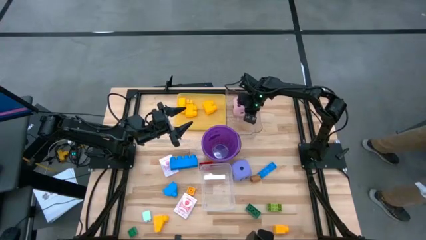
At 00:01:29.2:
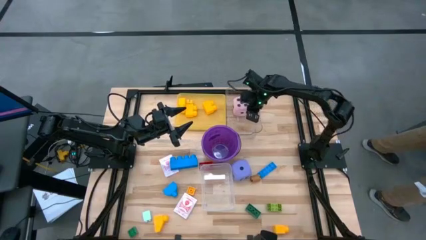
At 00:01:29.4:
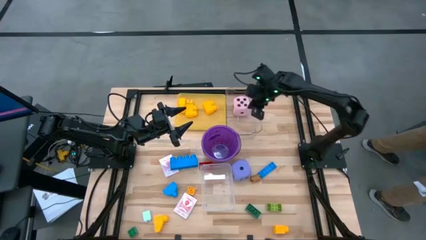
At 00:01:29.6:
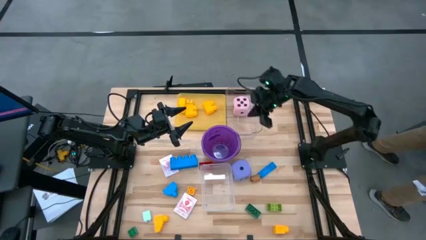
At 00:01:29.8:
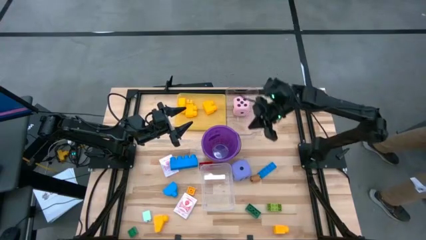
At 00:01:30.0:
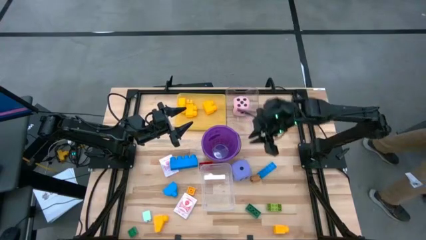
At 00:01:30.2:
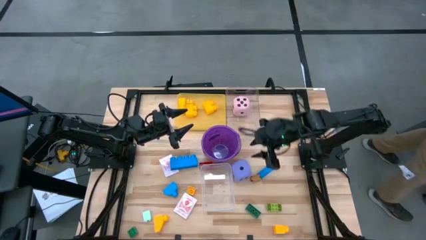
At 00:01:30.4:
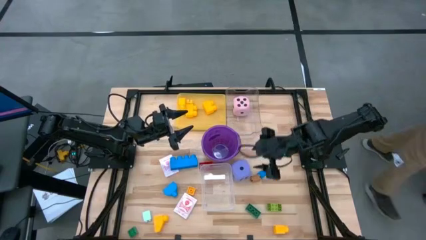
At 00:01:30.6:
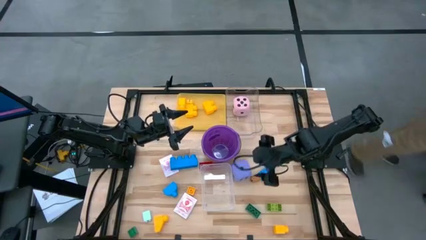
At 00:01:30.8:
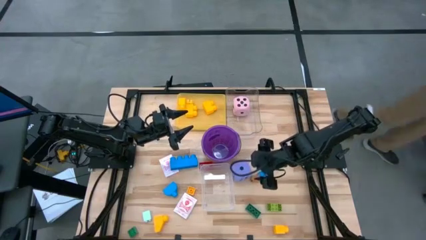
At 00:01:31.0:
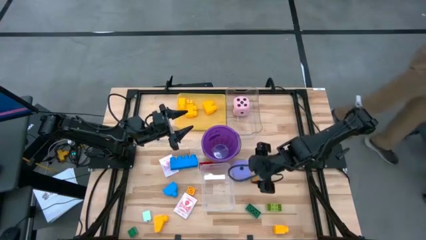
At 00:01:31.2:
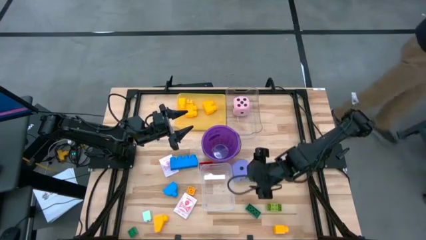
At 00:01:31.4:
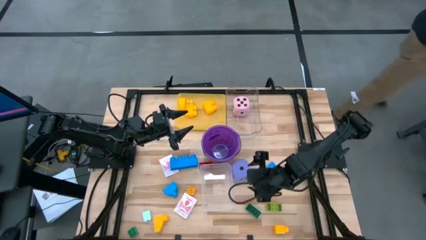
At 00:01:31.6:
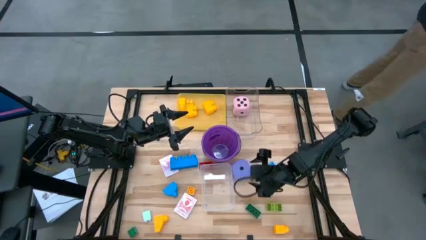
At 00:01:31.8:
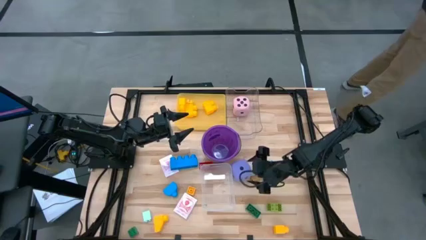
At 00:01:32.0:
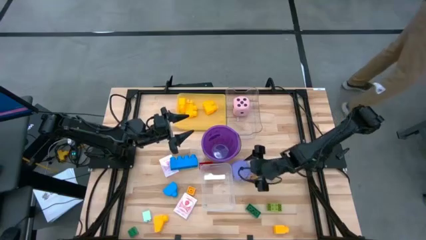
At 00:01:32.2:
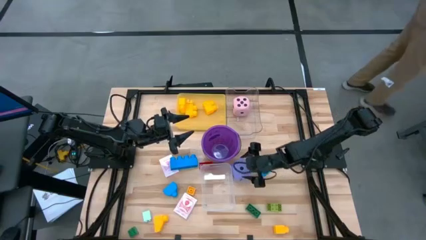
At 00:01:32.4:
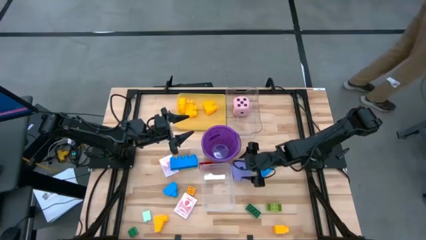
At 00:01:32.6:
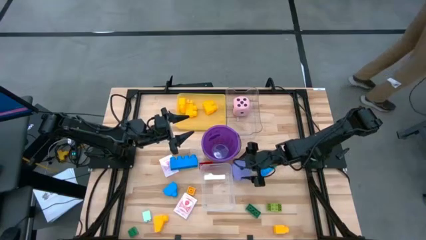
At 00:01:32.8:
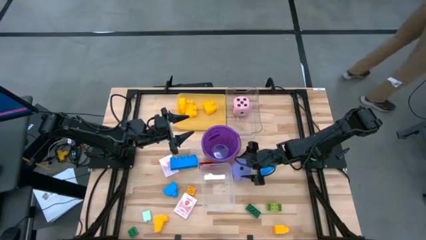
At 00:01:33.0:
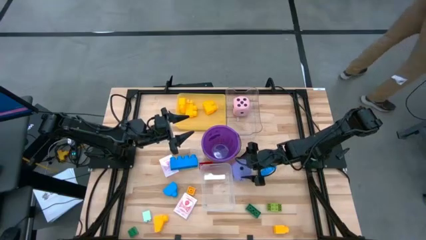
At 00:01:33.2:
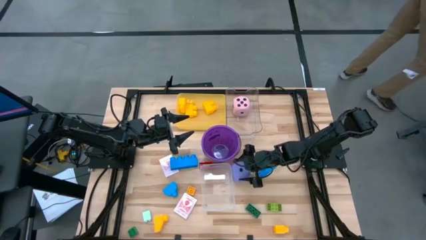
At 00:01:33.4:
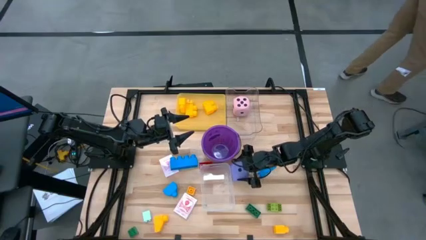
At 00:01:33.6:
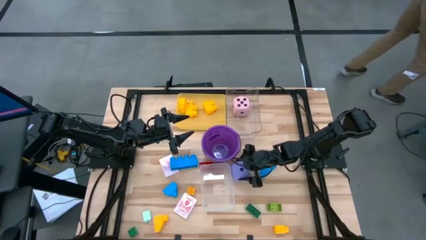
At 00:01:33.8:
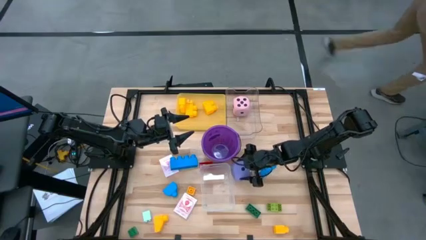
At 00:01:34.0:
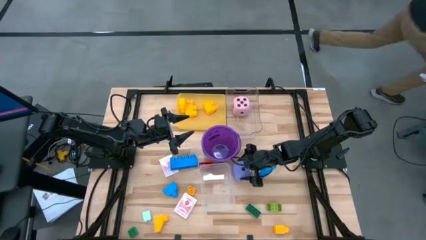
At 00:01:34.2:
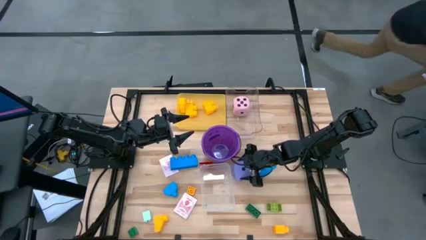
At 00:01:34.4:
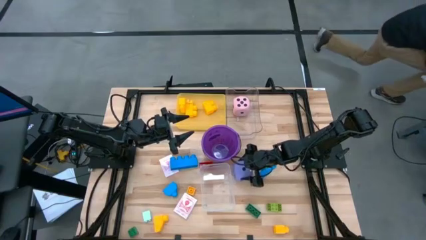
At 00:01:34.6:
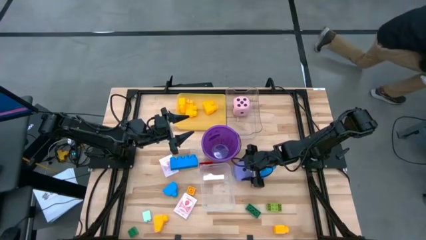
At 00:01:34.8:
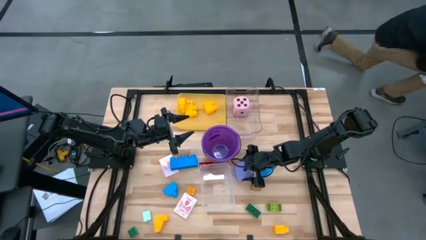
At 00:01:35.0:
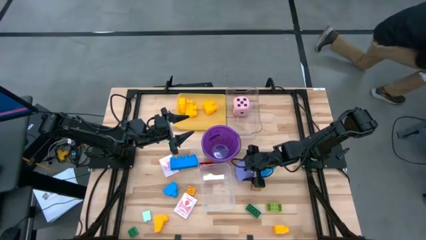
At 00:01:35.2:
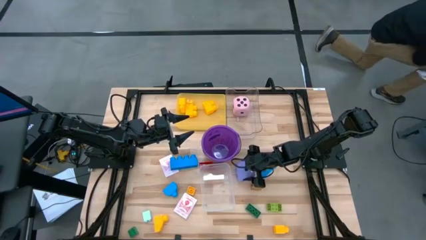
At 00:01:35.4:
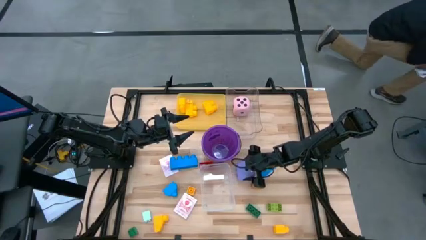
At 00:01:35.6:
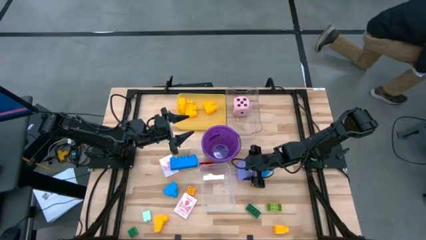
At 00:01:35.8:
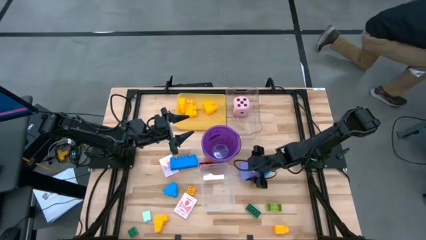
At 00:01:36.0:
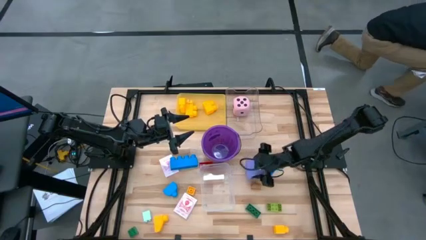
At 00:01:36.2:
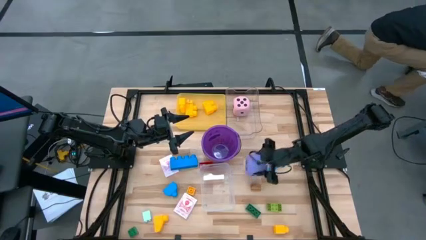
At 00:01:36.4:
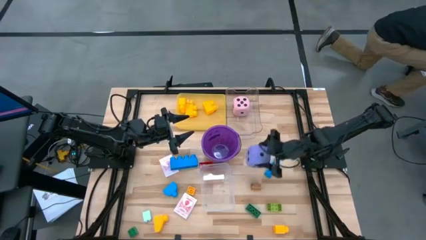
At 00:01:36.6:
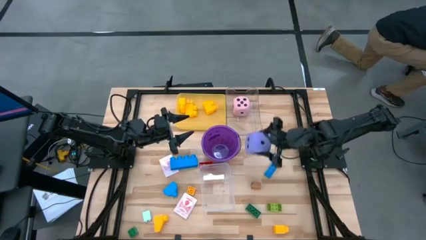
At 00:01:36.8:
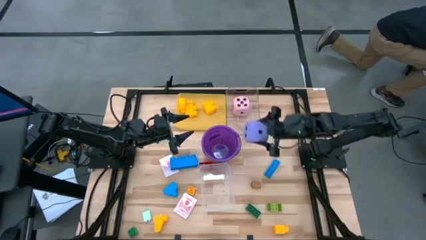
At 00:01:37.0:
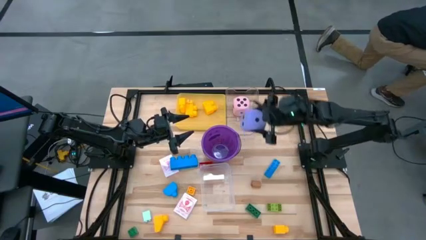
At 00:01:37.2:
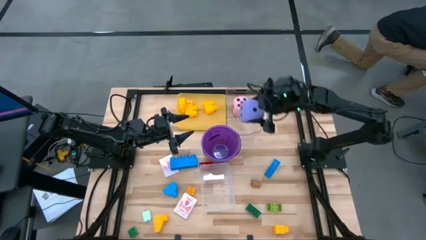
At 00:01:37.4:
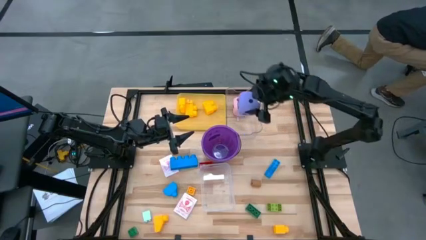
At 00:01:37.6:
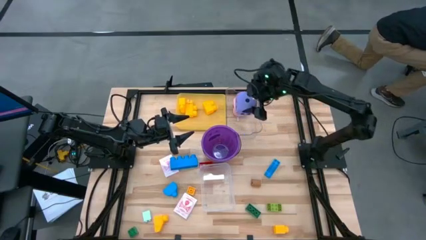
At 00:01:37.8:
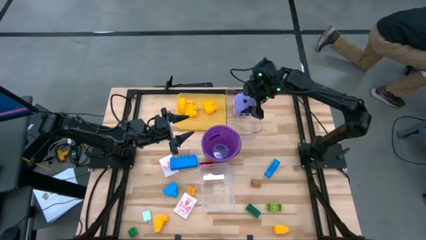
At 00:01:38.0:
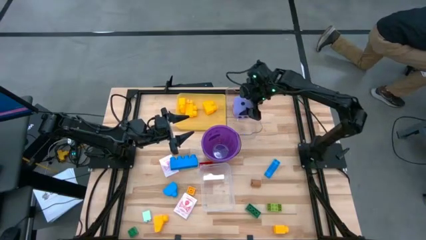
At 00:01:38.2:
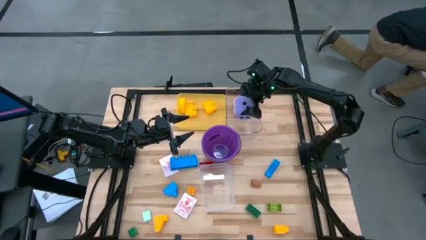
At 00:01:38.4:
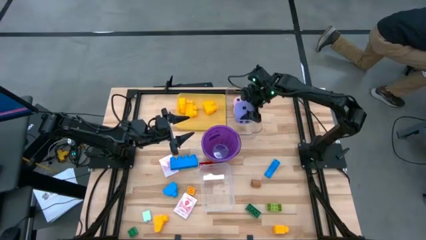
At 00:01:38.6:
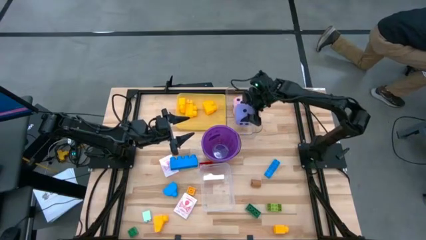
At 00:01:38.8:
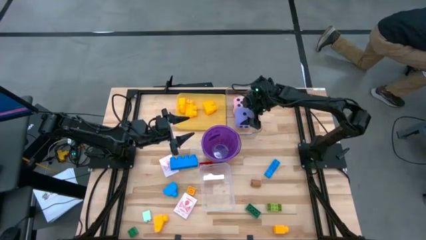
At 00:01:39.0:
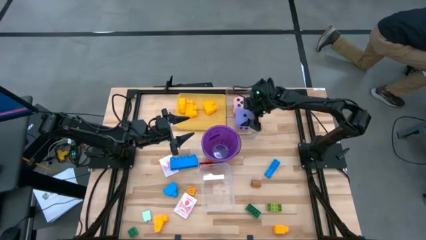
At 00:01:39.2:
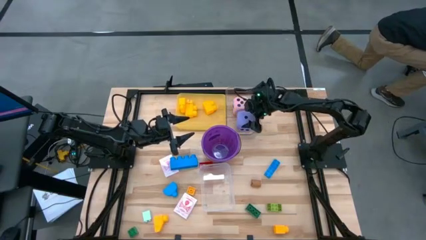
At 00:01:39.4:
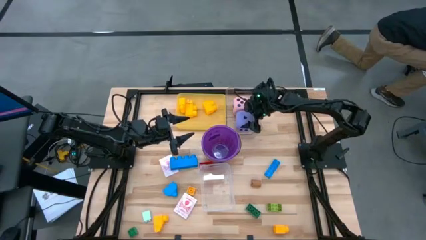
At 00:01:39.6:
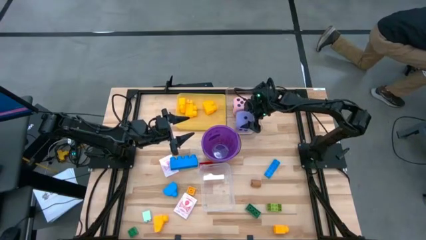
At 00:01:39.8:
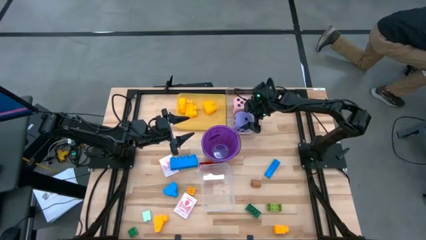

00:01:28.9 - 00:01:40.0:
Task: Pick & Place Toys
Put the purple dice into the top transparent bin

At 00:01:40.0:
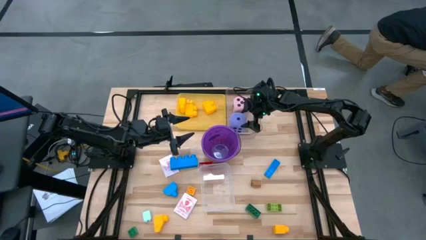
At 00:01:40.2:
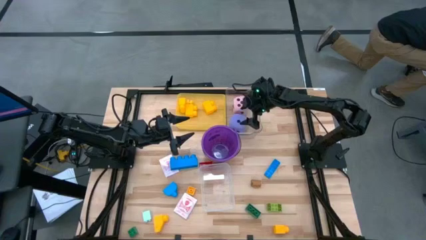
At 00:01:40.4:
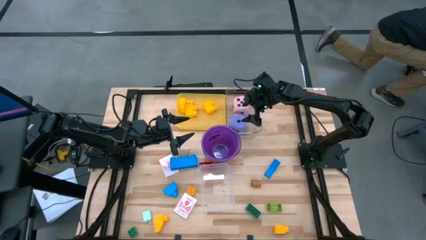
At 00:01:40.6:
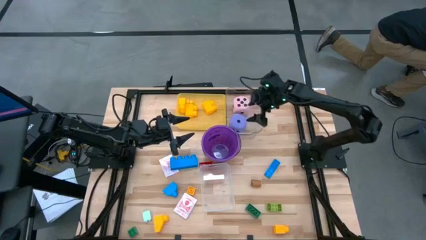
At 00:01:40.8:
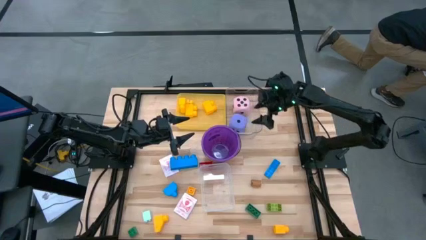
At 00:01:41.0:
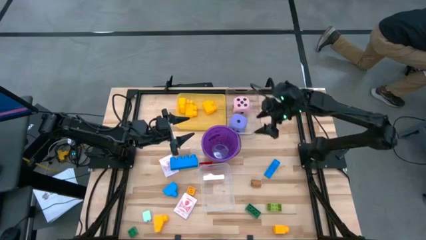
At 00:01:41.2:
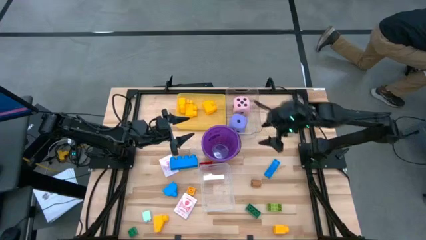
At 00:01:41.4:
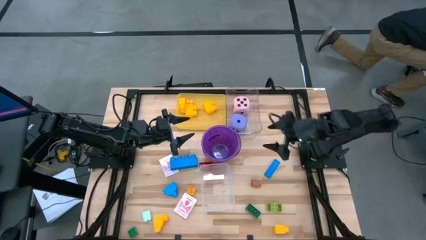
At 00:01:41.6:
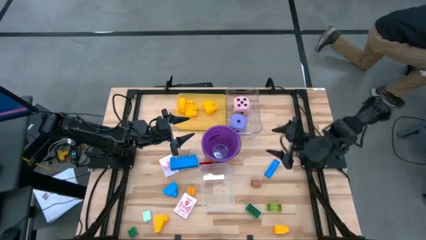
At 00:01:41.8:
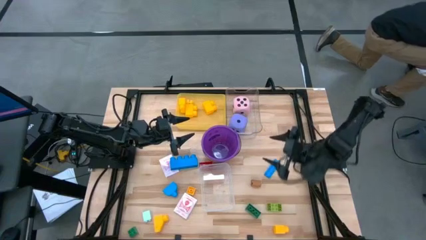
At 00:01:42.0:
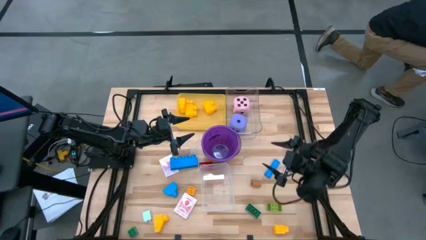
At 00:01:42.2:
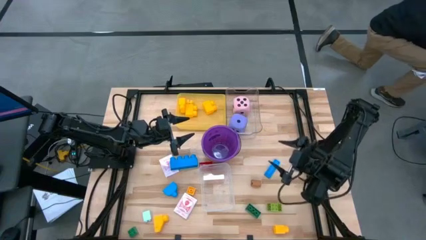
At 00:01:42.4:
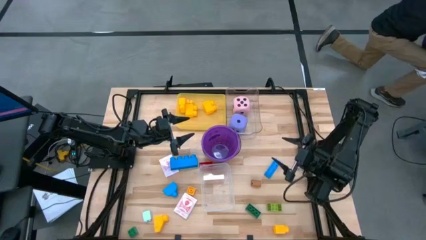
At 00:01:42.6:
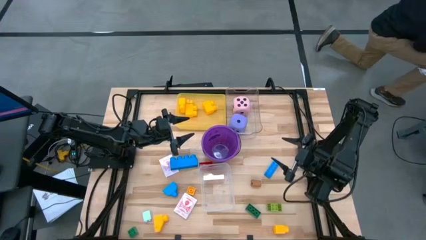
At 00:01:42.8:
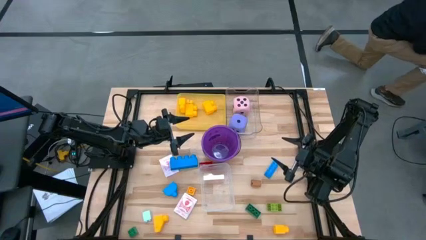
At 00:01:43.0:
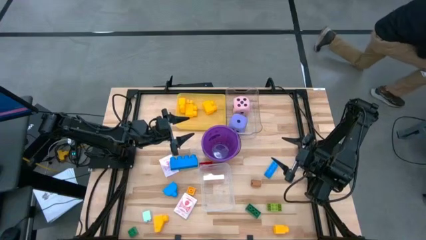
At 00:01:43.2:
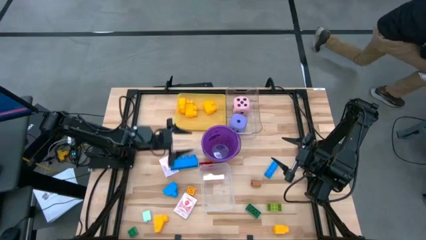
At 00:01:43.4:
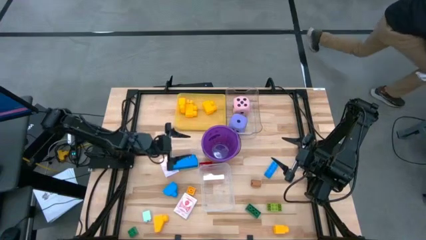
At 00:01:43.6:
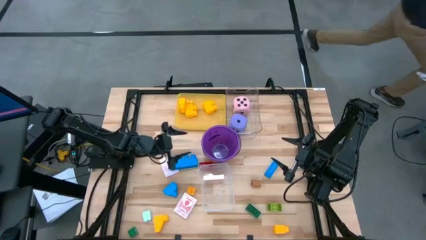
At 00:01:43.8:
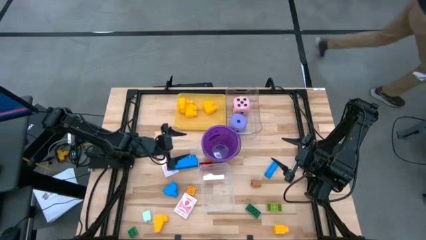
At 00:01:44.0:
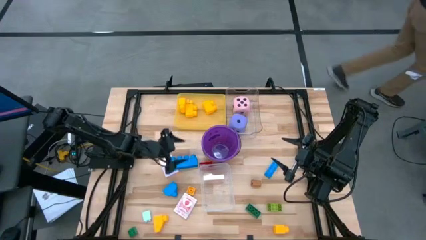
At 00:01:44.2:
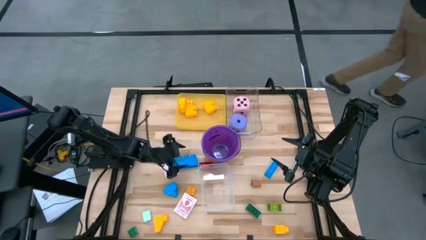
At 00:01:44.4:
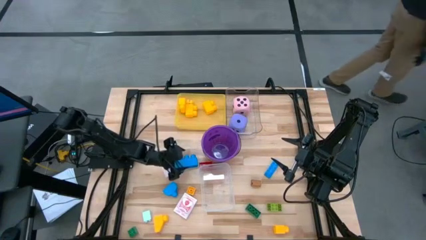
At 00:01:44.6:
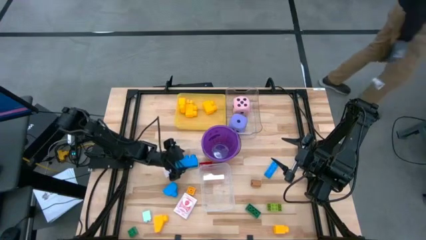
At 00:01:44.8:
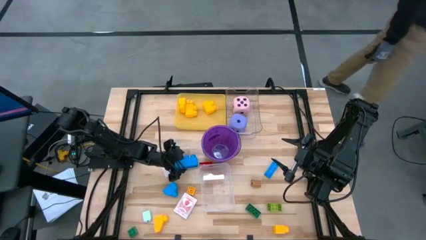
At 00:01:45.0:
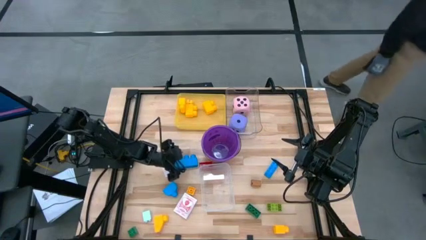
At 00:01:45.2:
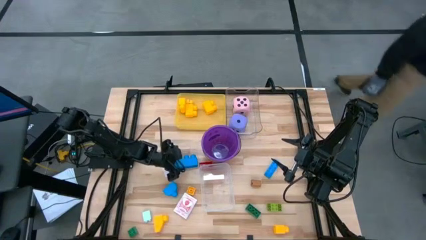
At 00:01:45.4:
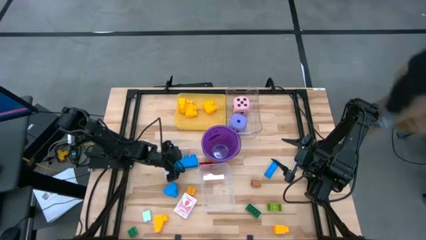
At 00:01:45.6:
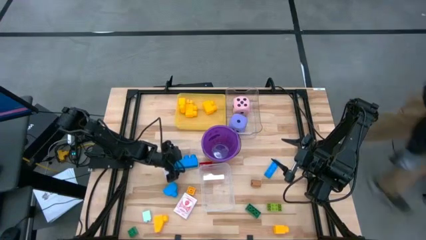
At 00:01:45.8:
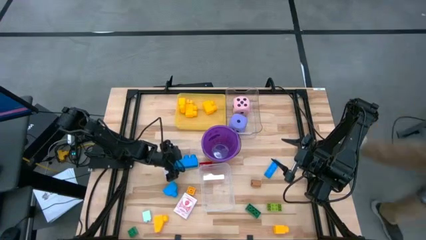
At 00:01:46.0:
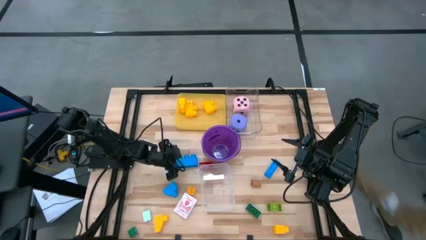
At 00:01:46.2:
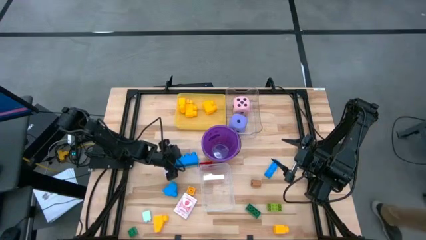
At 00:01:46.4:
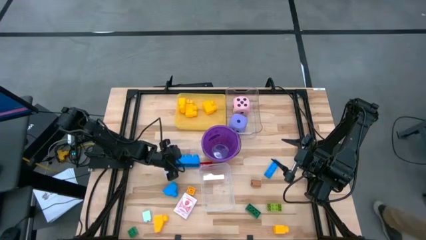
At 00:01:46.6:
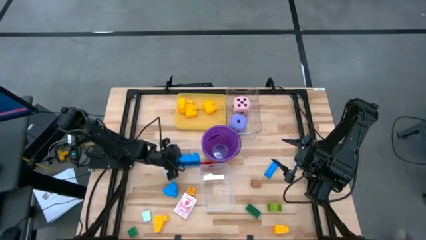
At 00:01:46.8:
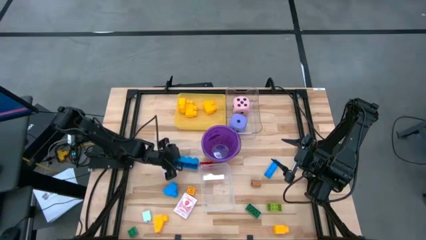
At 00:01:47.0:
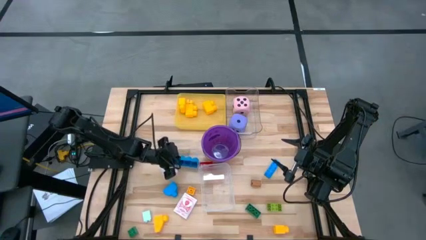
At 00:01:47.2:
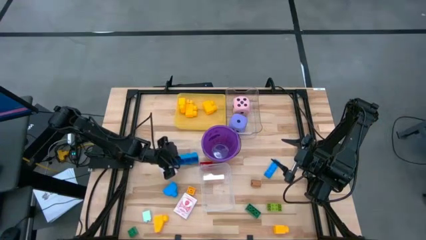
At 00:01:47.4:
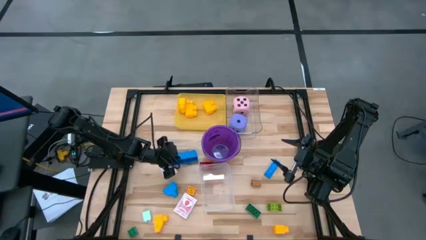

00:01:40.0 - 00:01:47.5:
Put the blue game piece into the yellow bin
